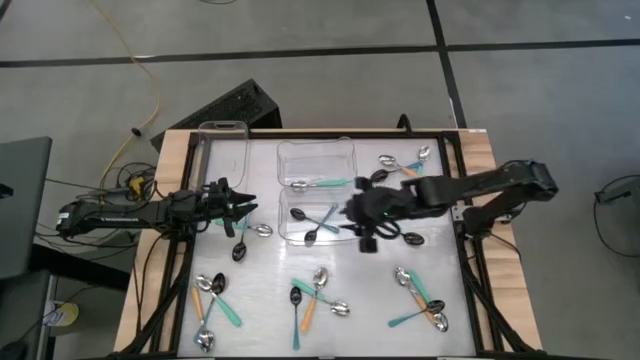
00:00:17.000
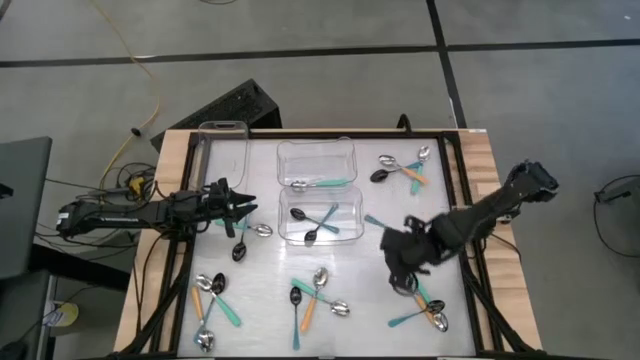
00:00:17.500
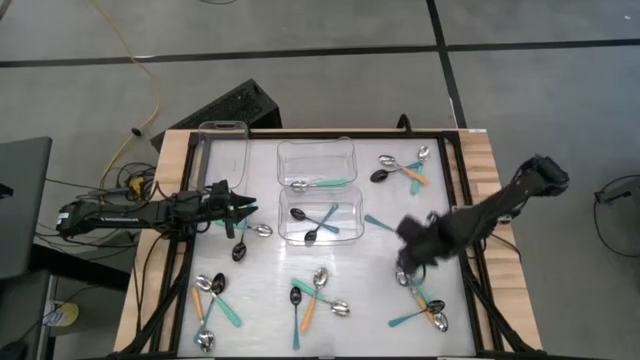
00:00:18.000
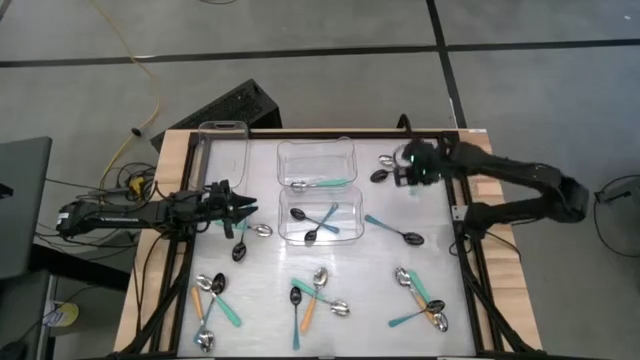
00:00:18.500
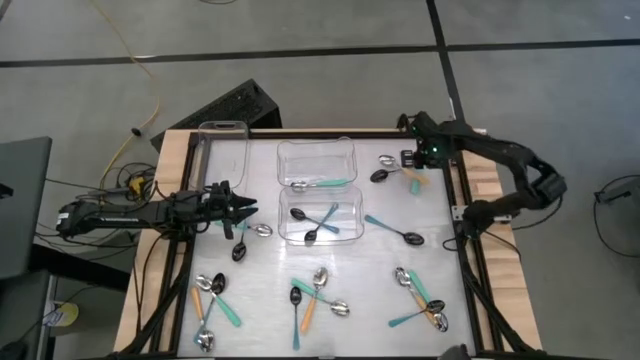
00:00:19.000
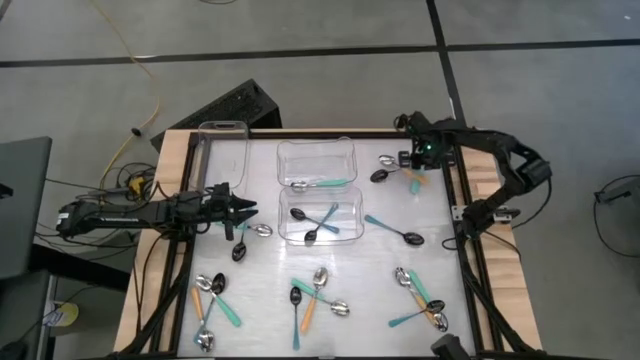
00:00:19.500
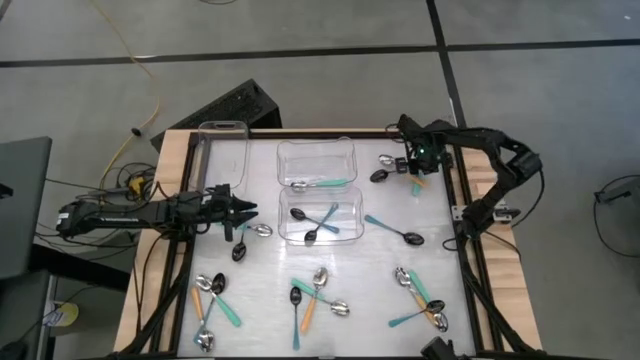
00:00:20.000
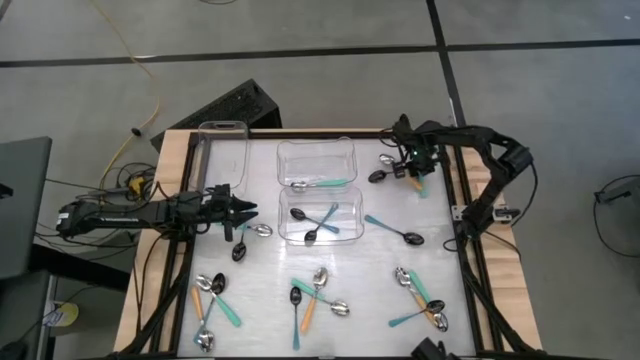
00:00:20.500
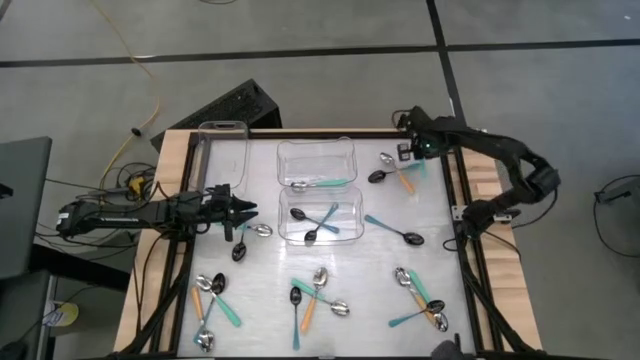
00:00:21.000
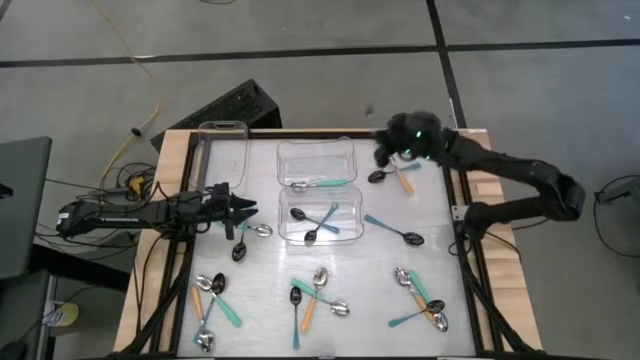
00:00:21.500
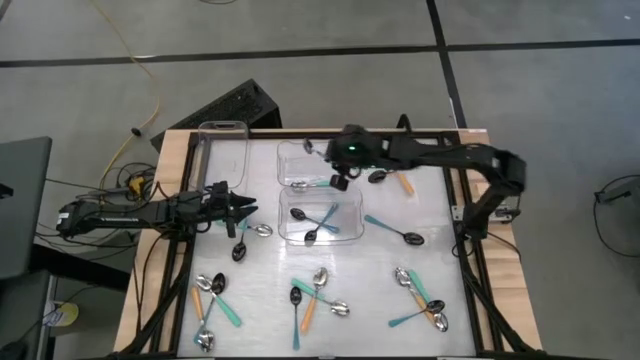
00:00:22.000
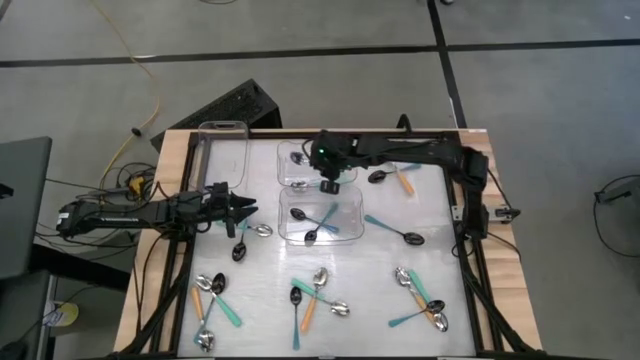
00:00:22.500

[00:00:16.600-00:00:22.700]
Task: Sort silverware by color (type)
Put the green spoon into the top right transparent bin

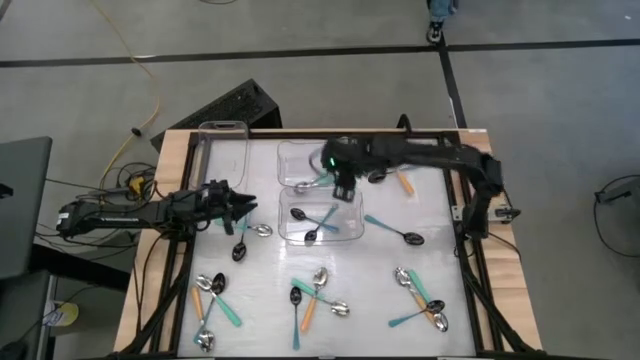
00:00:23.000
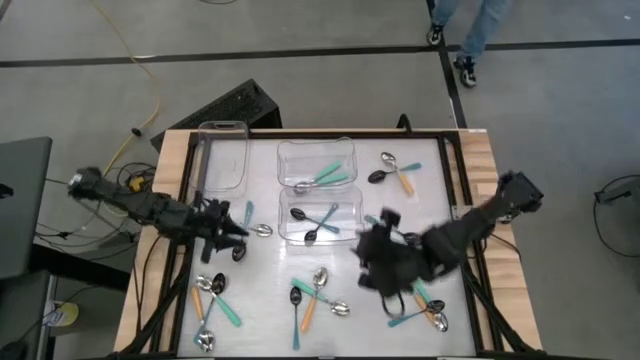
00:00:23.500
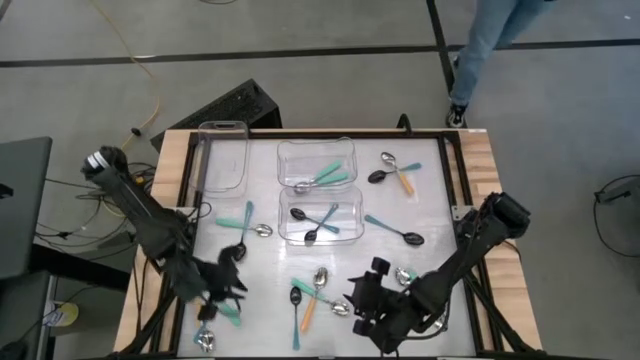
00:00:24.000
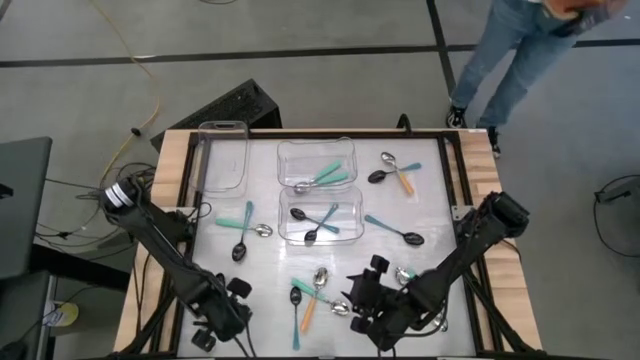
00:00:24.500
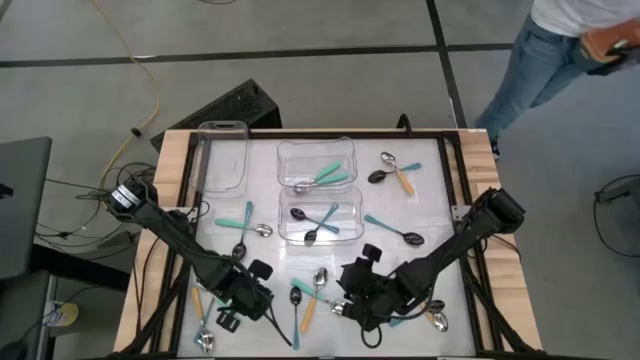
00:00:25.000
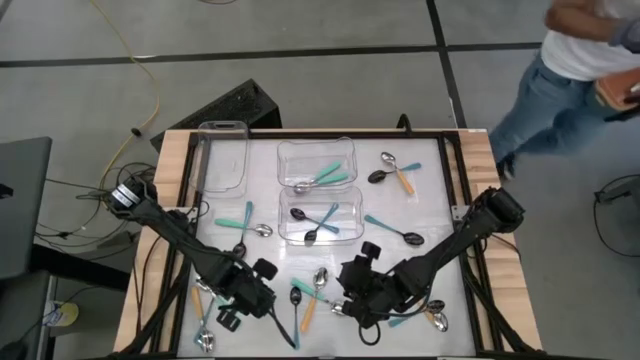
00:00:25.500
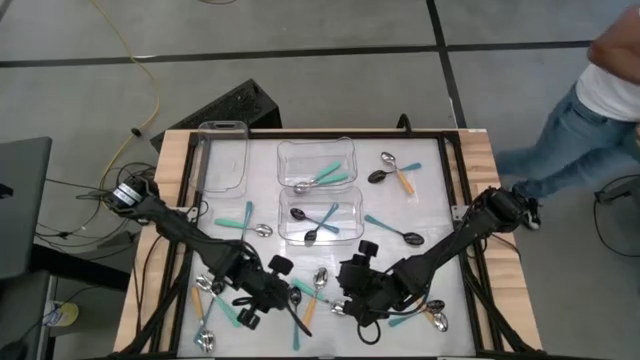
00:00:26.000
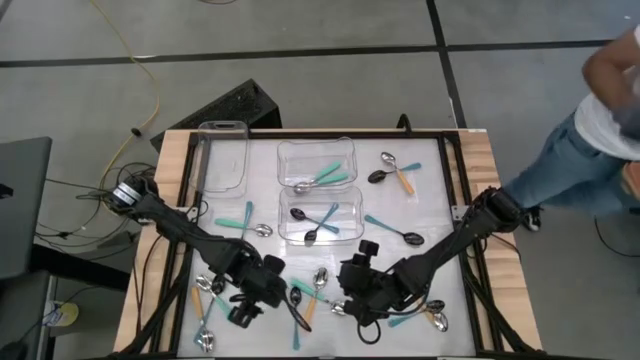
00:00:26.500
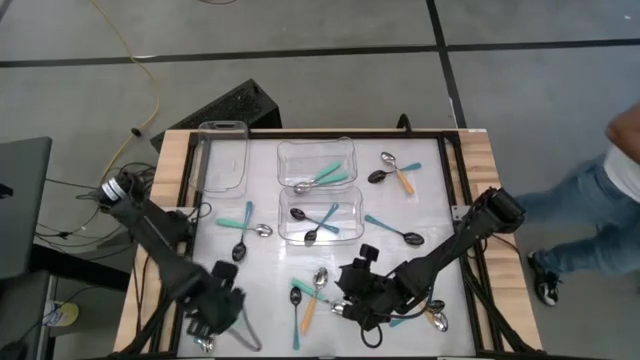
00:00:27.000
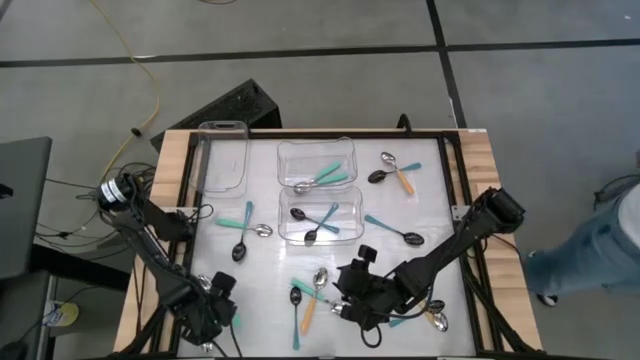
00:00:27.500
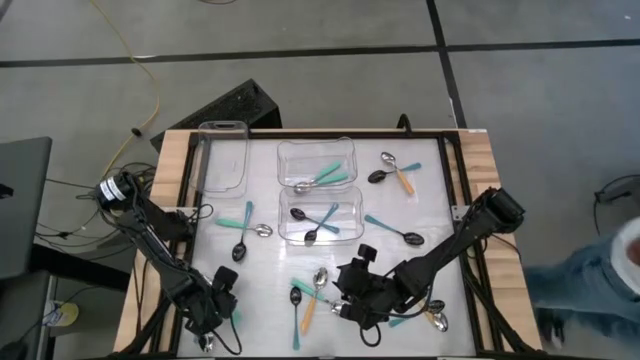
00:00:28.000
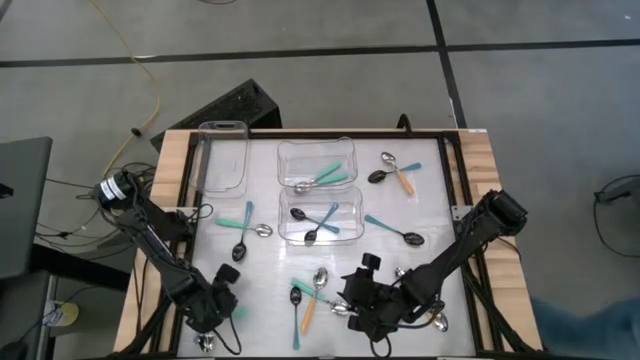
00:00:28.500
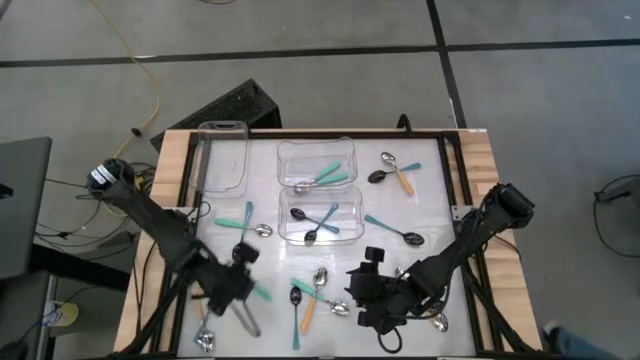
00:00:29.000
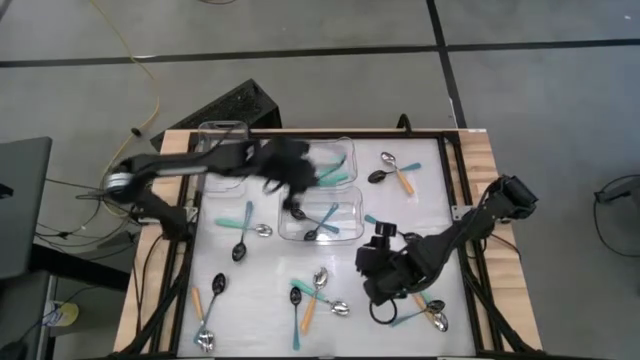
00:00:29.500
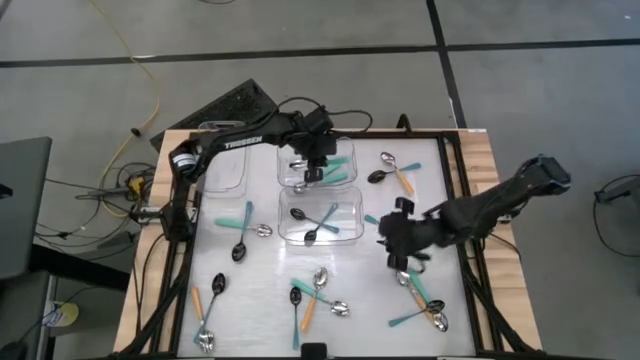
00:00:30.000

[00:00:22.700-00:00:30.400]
Put the green spoon into the top right transparent bin

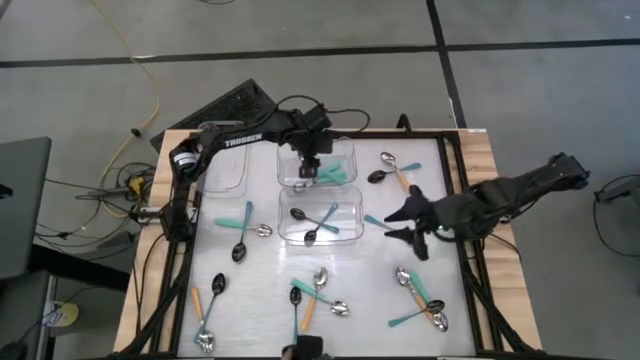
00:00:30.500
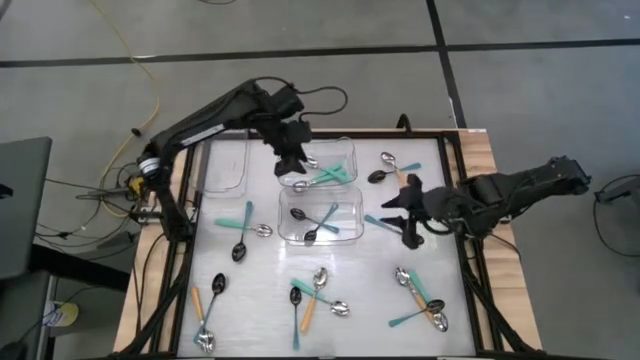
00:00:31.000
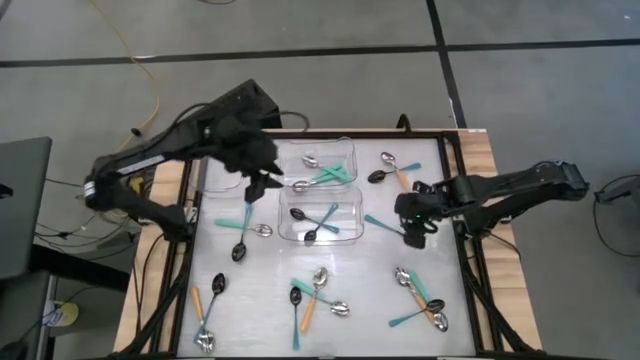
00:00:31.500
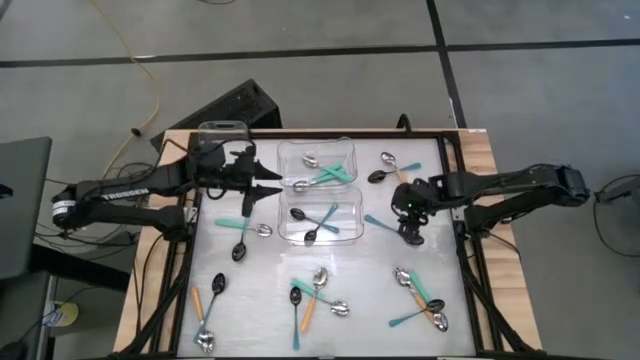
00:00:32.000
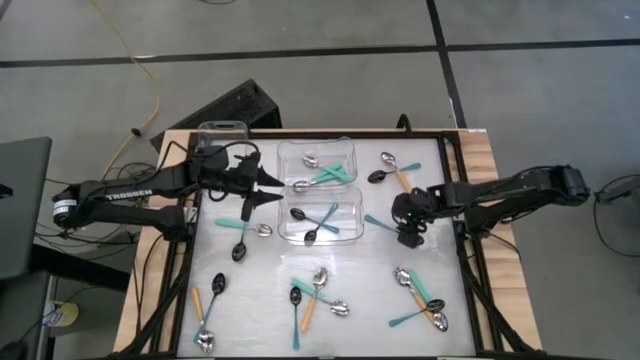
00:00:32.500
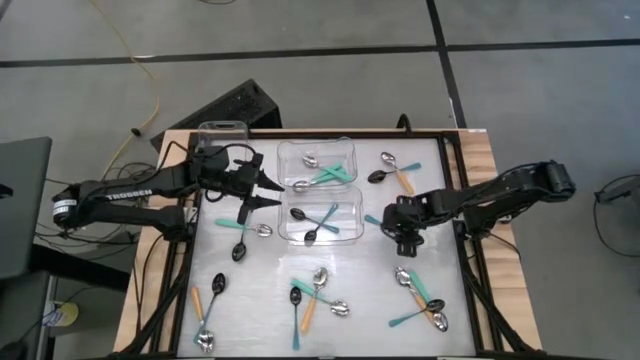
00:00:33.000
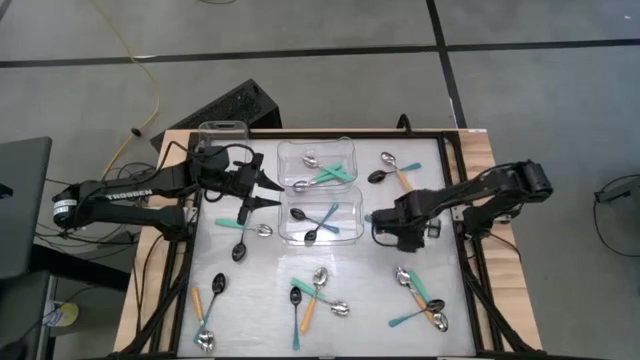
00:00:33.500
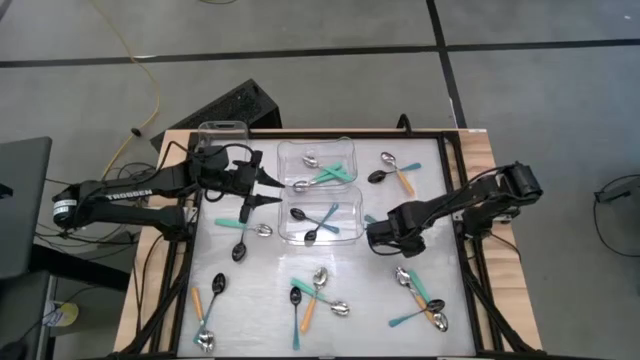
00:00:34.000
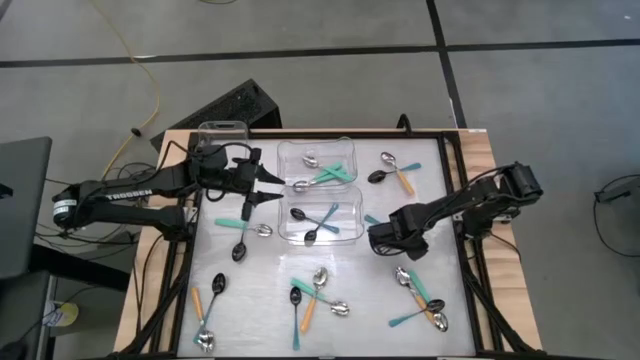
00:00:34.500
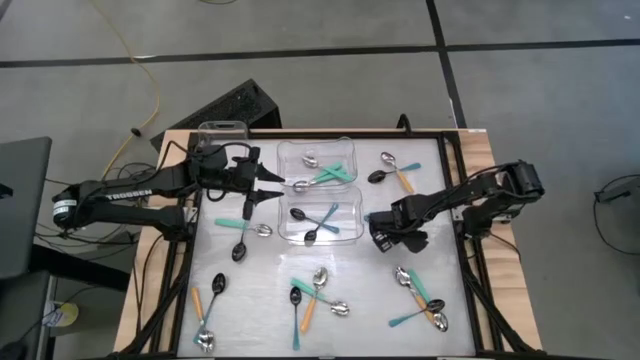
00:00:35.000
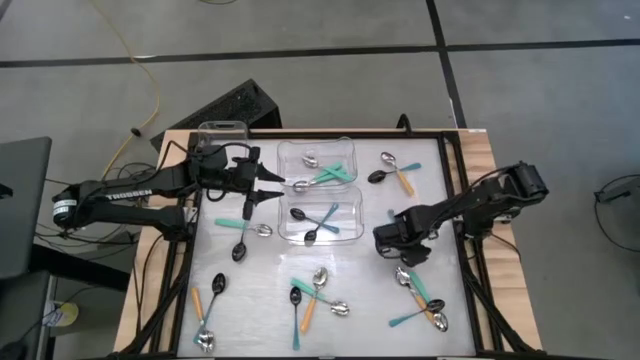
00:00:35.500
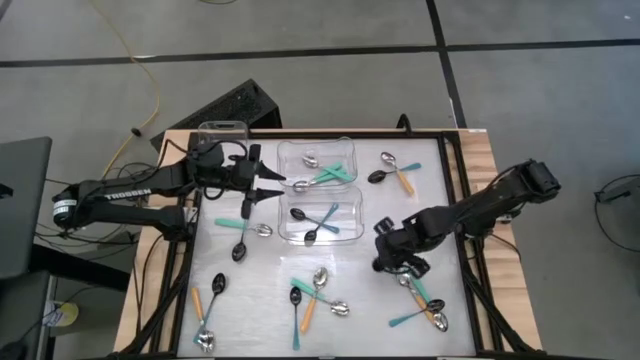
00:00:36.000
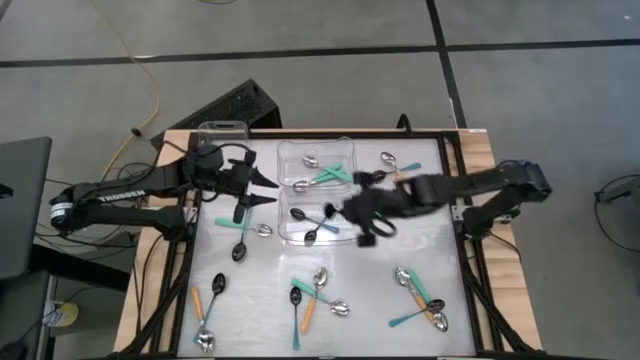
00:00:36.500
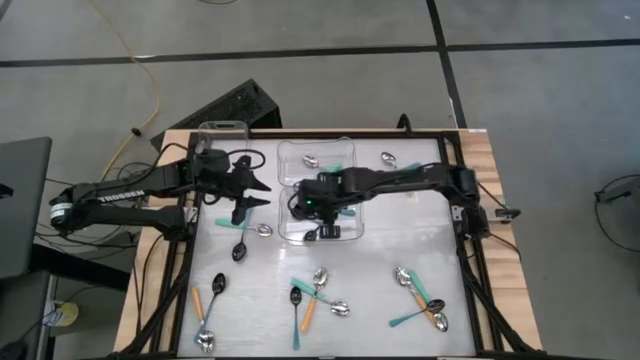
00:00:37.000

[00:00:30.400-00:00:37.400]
Put the blue spoon into the bottom transparent bin
